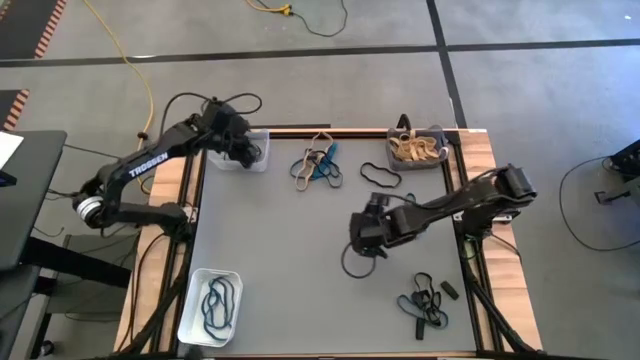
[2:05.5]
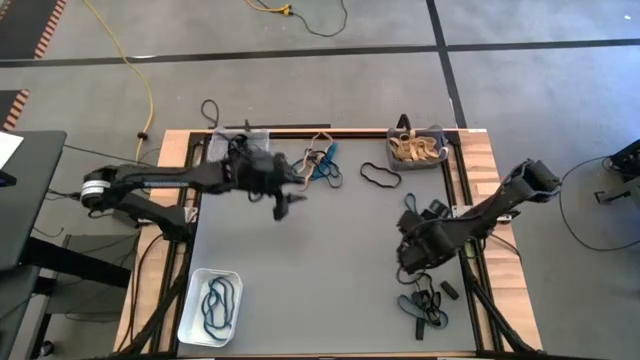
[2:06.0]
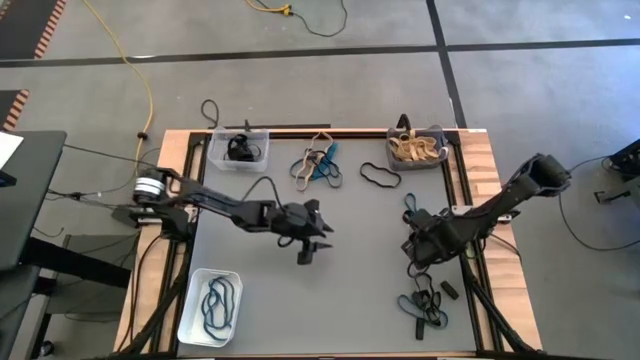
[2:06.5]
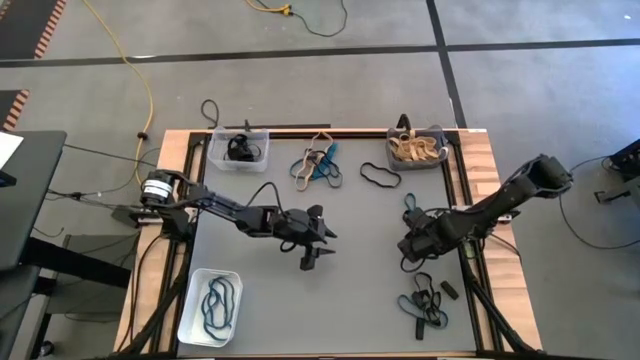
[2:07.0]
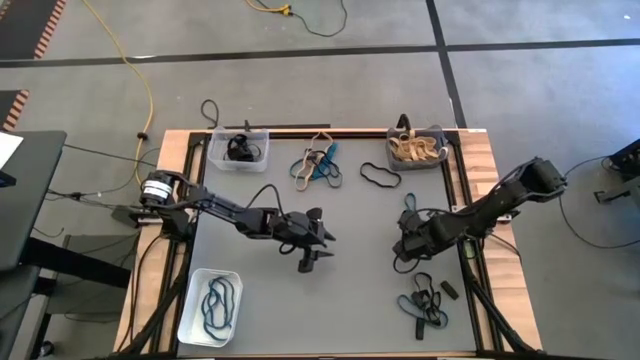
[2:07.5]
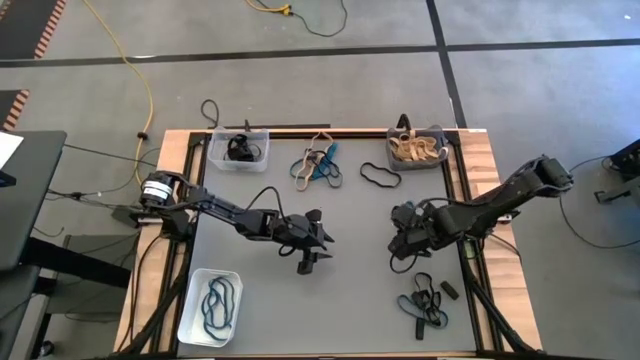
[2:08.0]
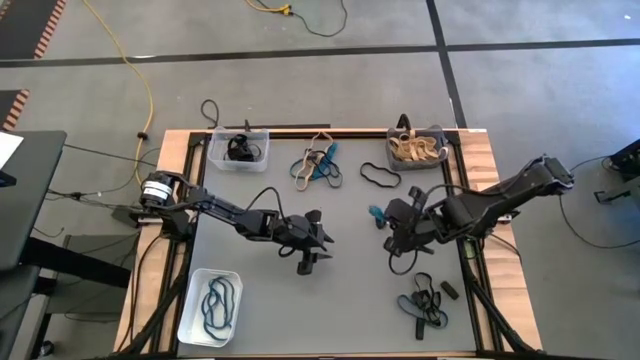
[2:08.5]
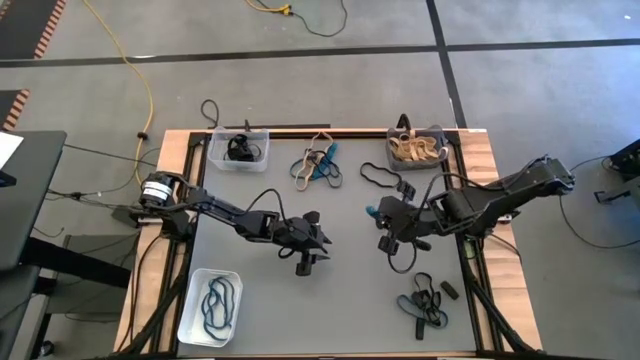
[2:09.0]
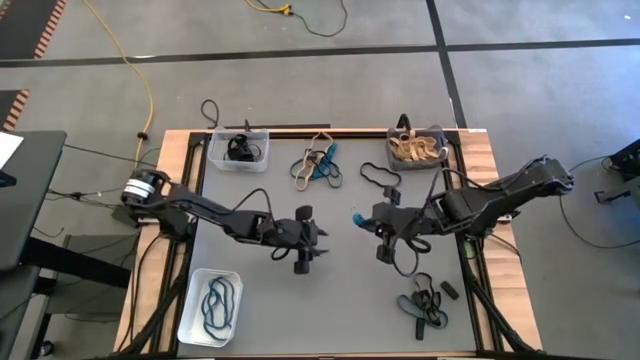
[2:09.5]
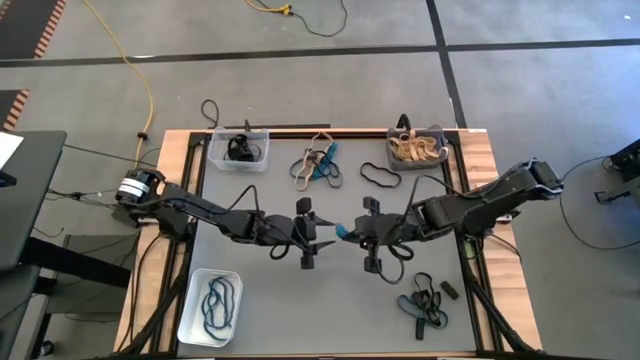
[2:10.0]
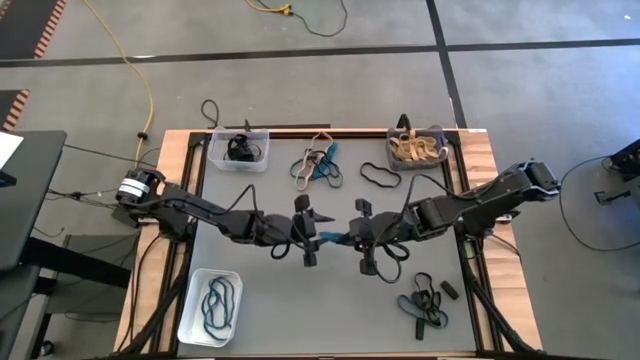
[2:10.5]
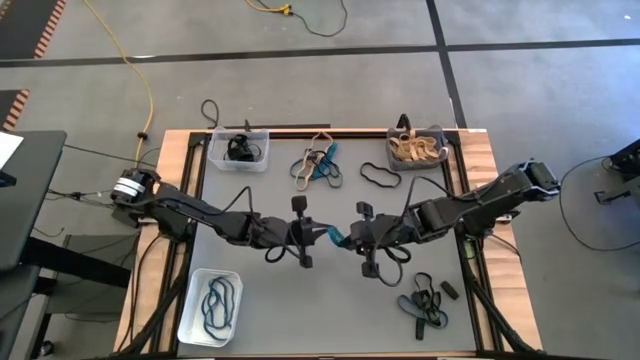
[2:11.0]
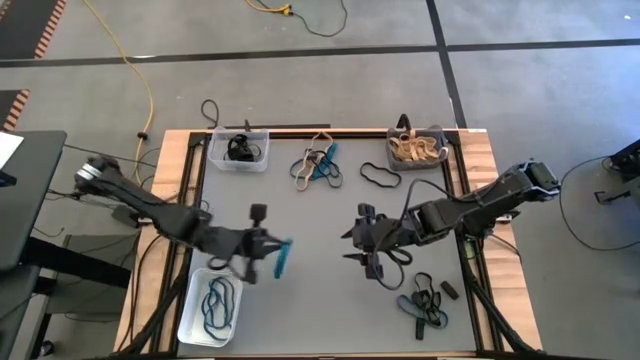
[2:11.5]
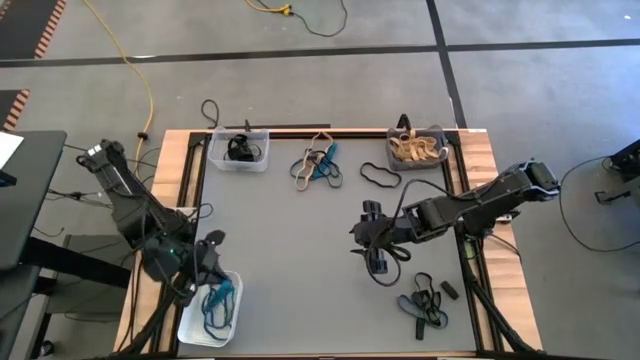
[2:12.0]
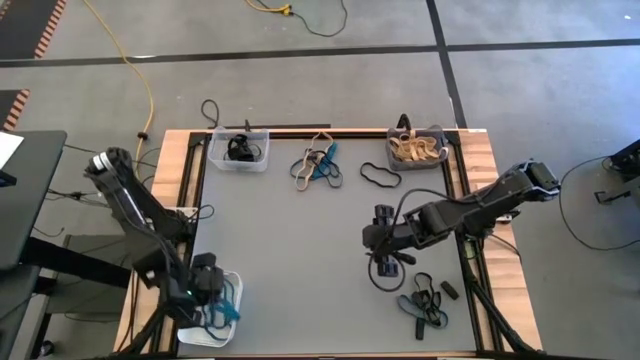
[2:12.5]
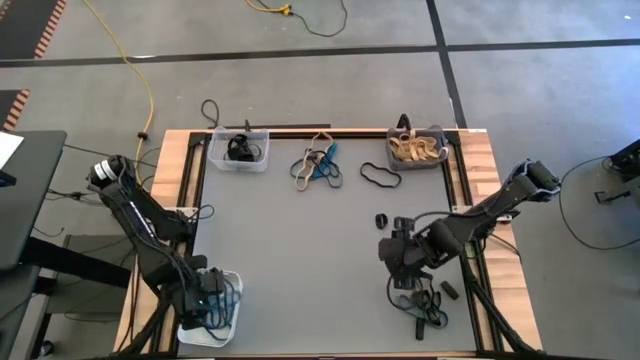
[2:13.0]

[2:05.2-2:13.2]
Task: Sort rubber bands into baskets
Put the blue rubber band into the white bin

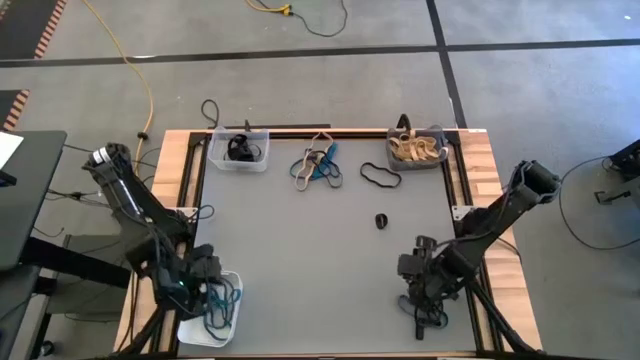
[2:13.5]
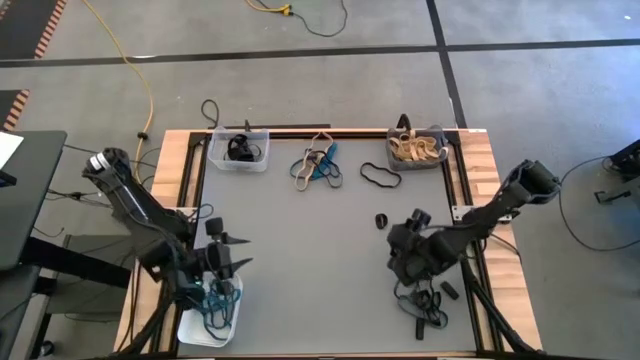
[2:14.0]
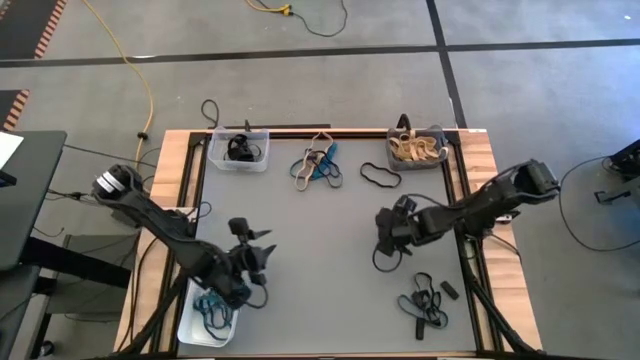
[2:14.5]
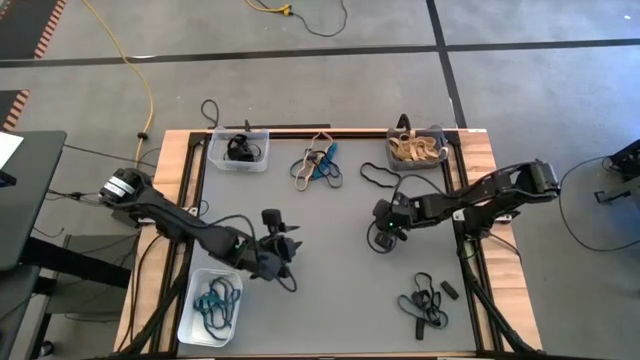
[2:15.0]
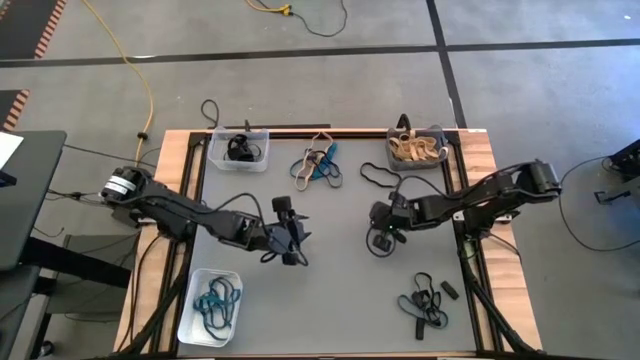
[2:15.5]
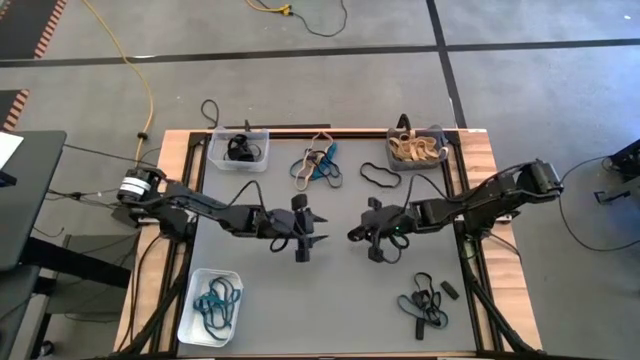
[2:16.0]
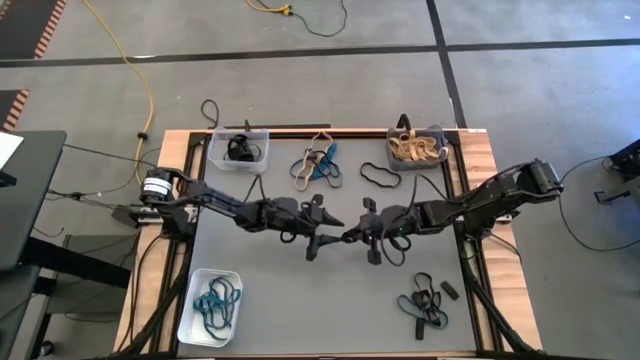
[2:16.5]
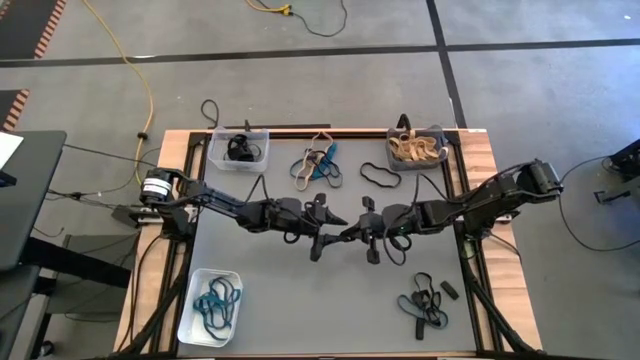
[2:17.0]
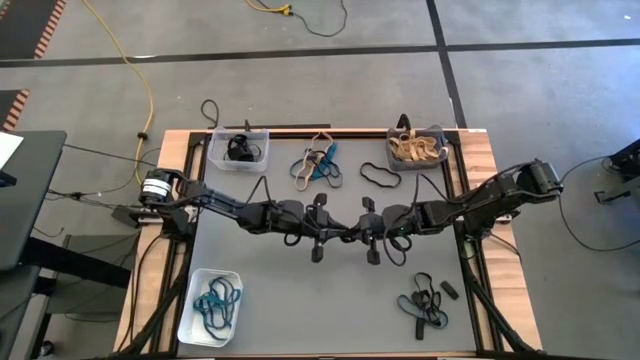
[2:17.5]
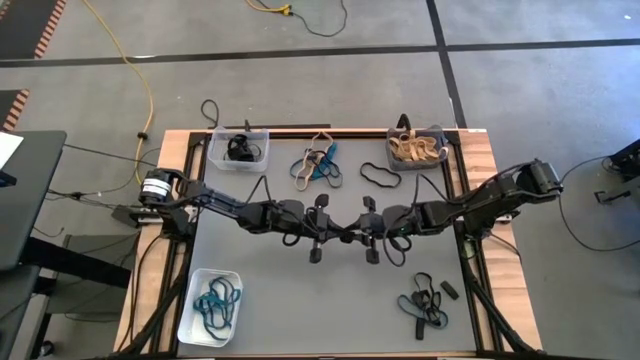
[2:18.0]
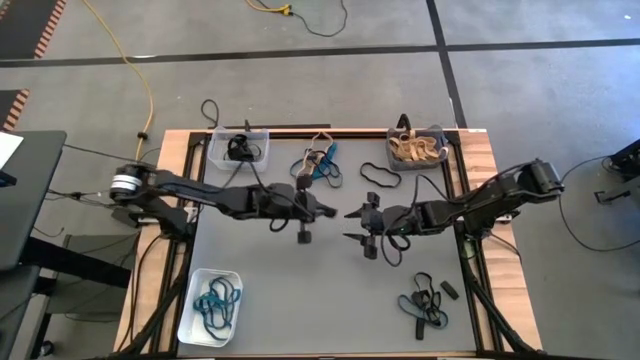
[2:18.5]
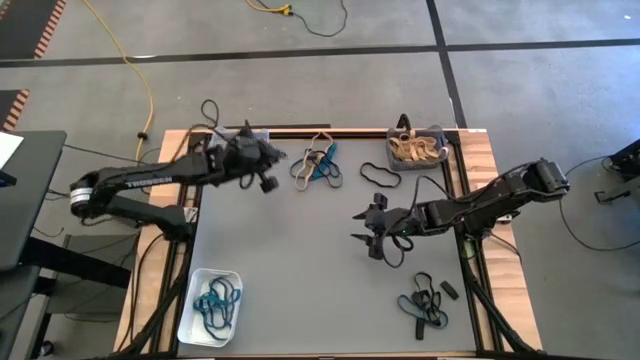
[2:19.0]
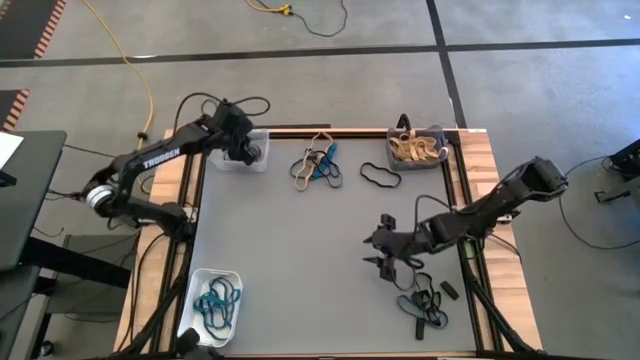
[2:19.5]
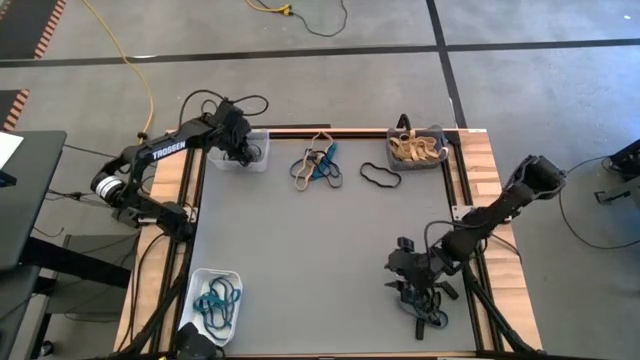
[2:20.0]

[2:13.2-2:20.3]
Put the black rubber band into the transparent bin

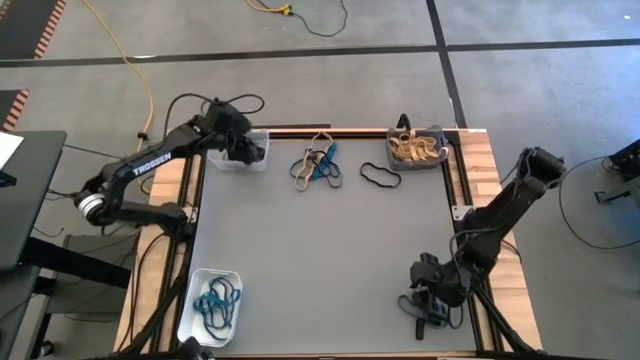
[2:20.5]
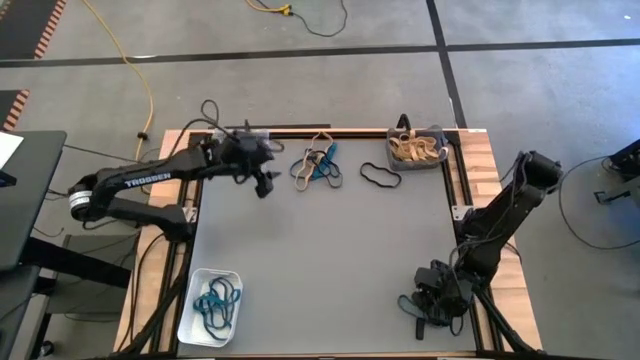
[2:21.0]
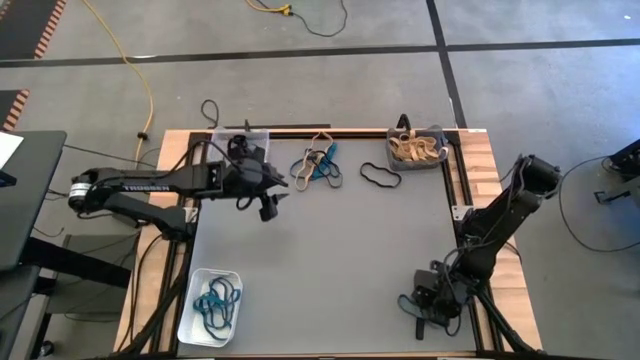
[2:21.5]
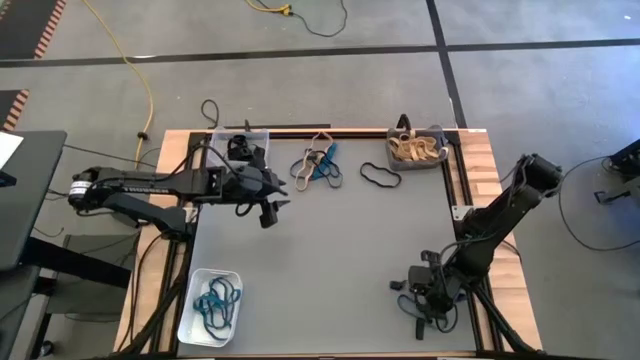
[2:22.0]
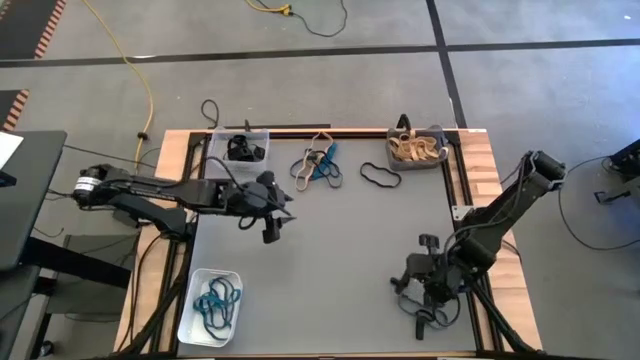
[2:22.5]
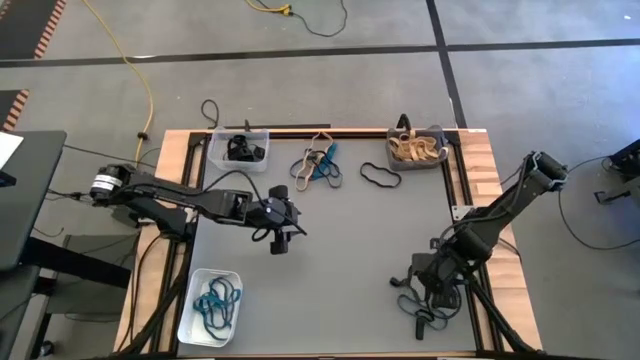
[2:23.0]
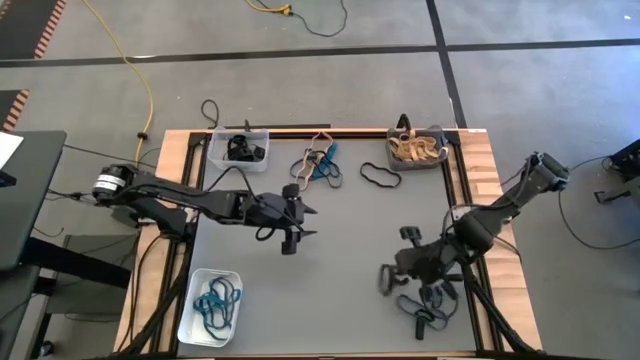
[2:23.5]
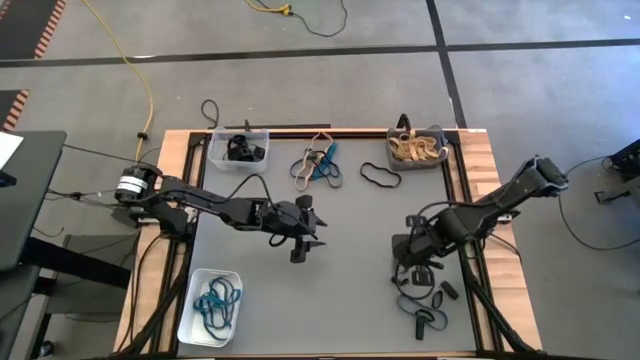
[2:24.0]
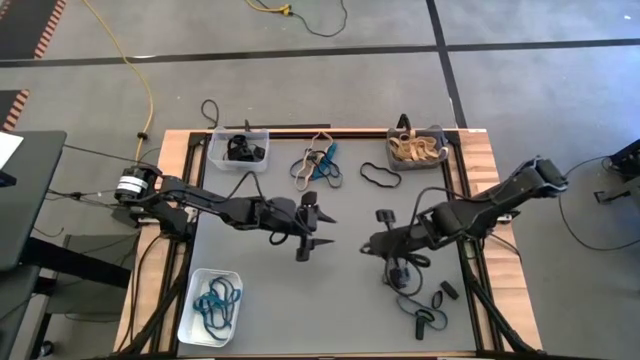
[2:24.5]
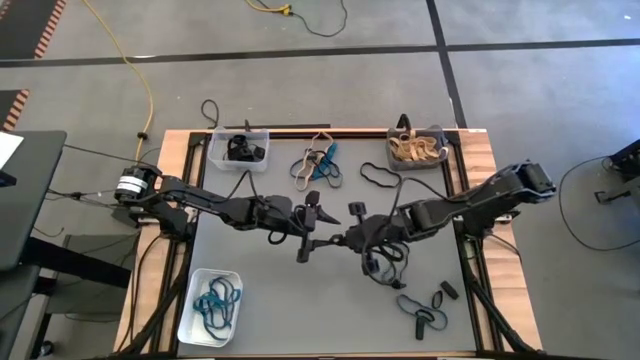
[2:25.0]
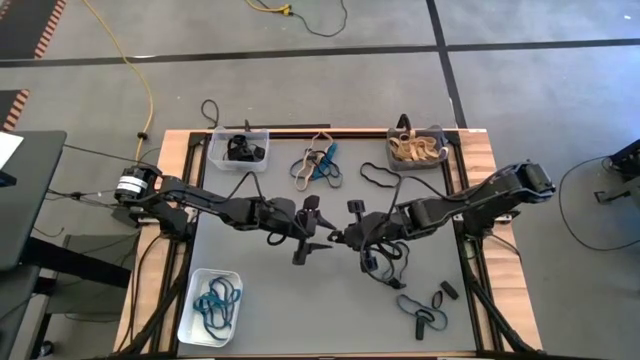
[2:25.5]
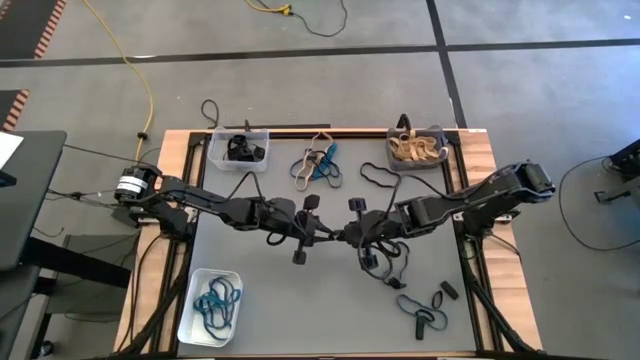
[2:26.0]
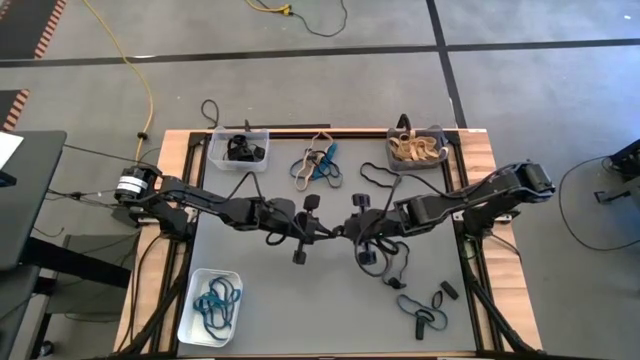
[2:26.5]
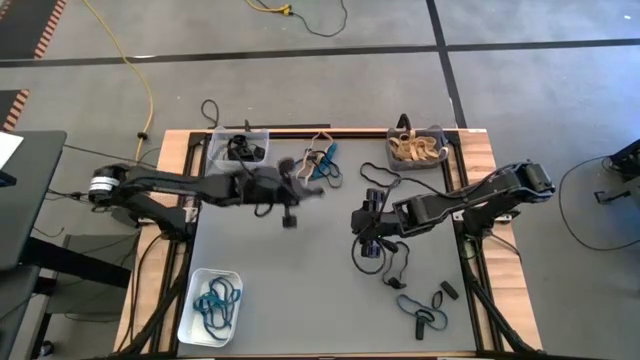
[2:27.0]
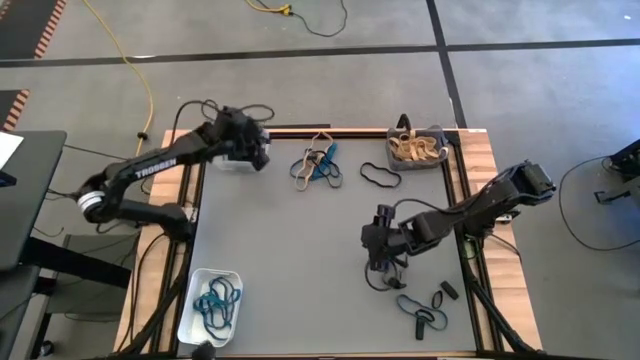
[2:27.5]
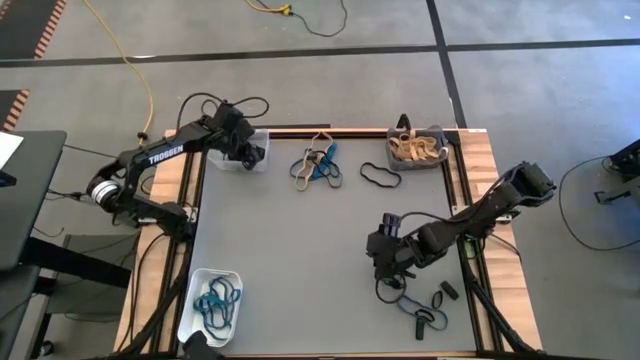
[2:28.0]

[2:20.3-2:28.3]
Put the black rubber band into the transparent bin
